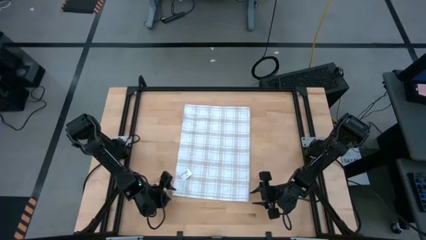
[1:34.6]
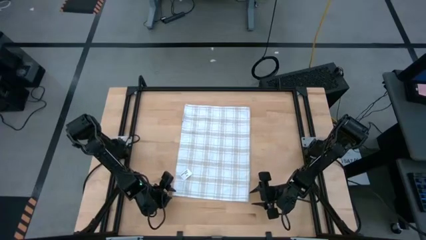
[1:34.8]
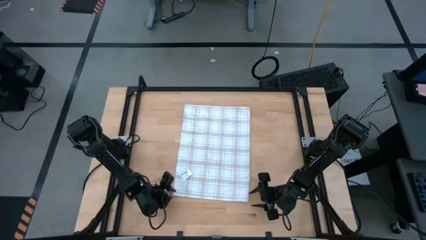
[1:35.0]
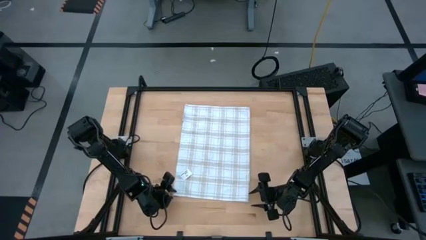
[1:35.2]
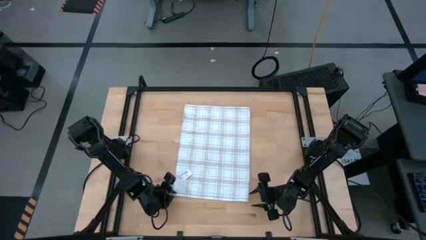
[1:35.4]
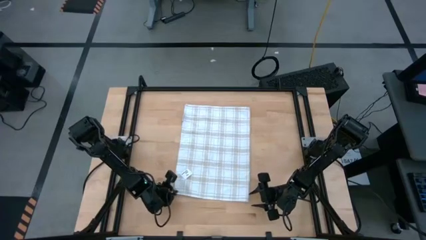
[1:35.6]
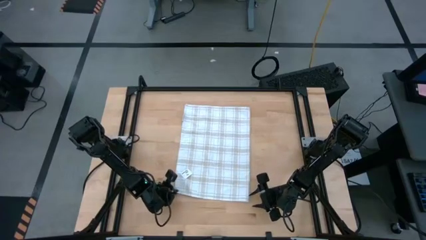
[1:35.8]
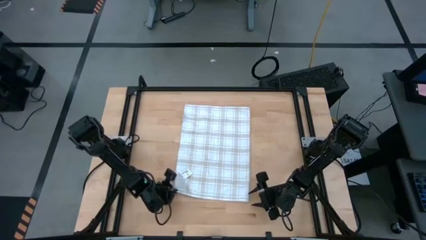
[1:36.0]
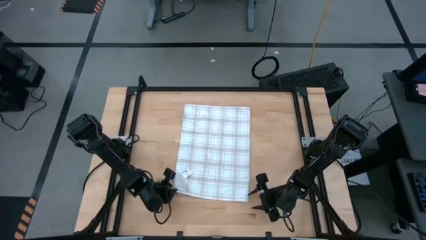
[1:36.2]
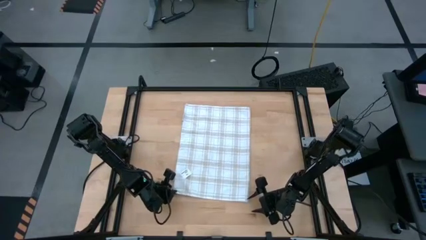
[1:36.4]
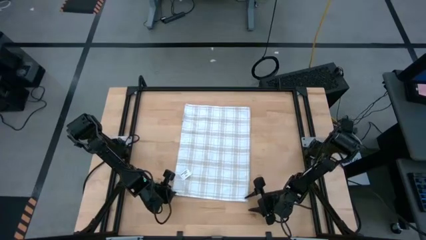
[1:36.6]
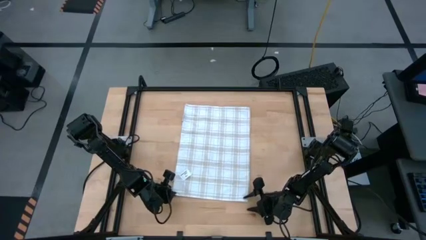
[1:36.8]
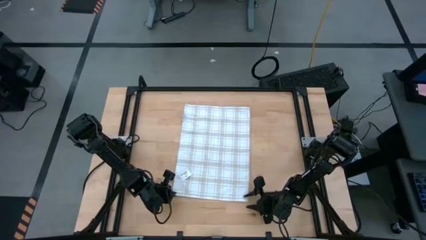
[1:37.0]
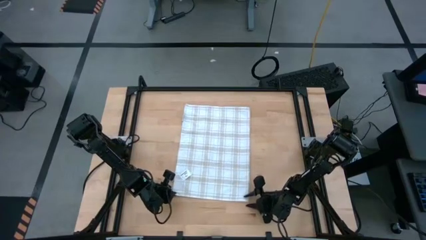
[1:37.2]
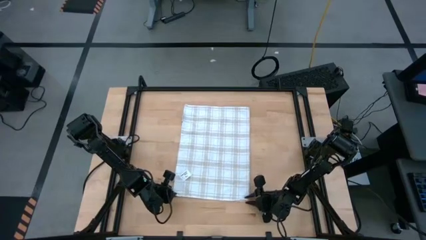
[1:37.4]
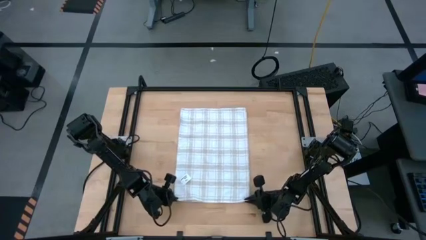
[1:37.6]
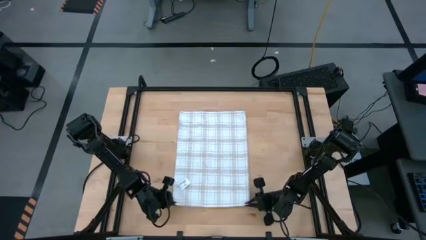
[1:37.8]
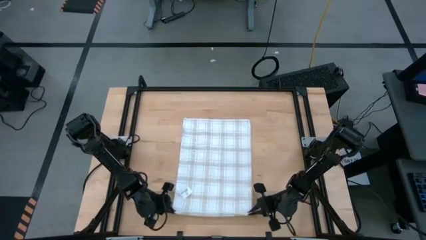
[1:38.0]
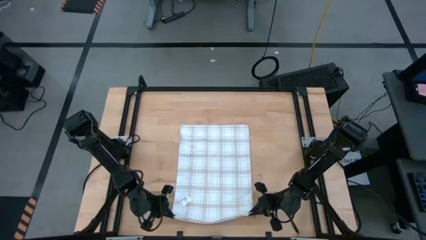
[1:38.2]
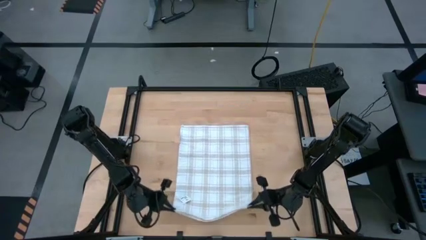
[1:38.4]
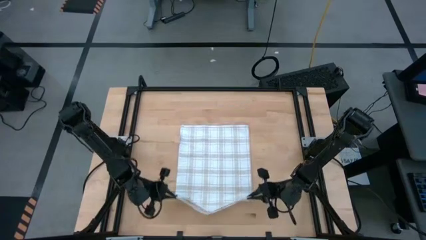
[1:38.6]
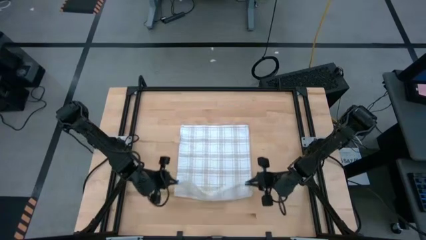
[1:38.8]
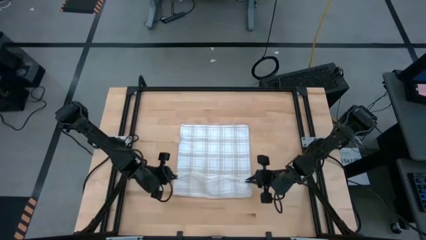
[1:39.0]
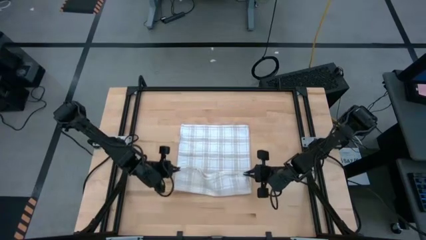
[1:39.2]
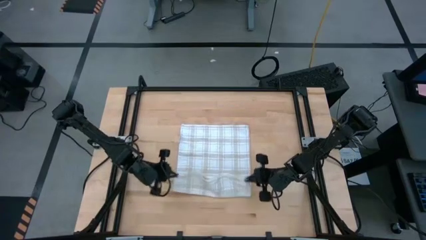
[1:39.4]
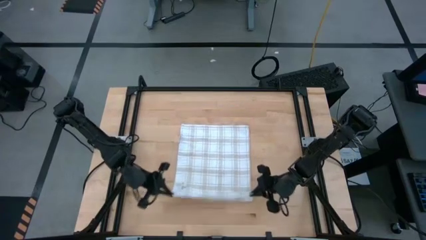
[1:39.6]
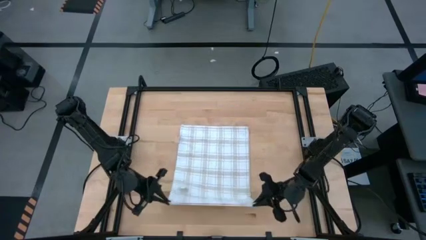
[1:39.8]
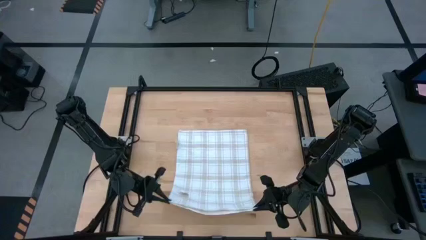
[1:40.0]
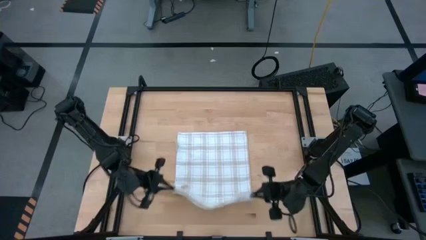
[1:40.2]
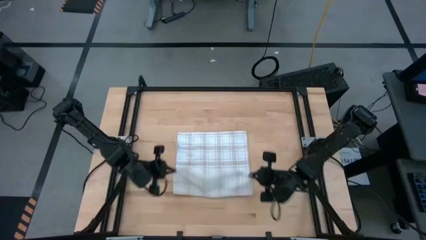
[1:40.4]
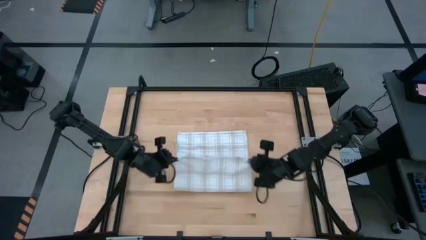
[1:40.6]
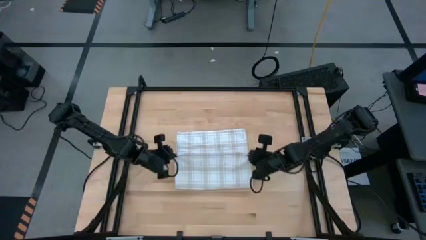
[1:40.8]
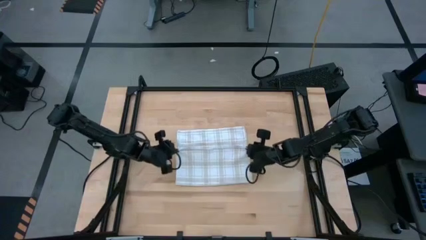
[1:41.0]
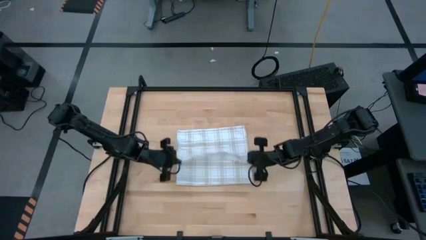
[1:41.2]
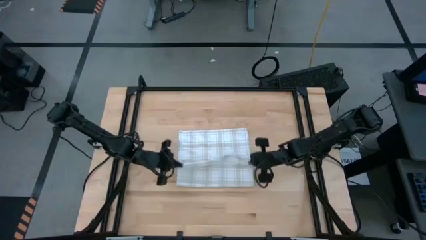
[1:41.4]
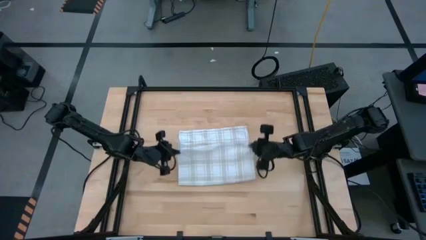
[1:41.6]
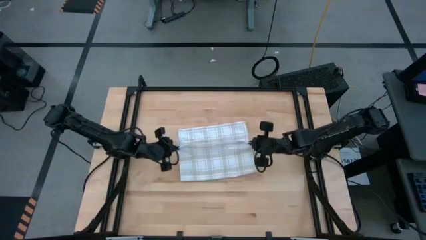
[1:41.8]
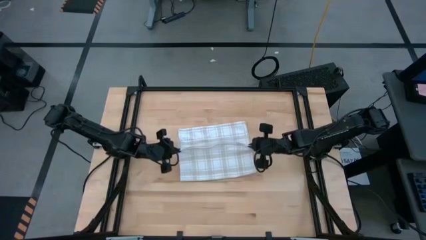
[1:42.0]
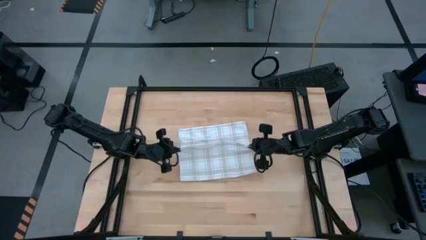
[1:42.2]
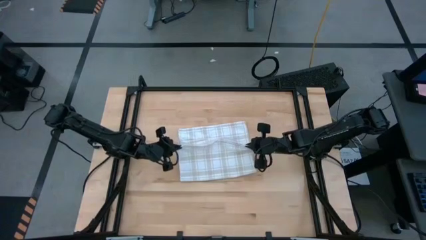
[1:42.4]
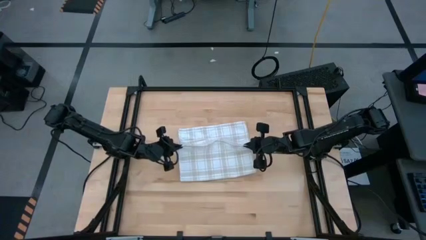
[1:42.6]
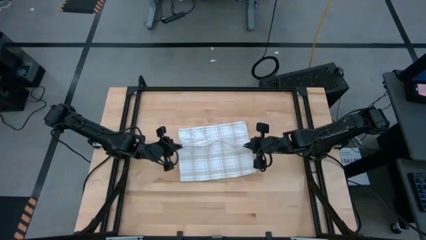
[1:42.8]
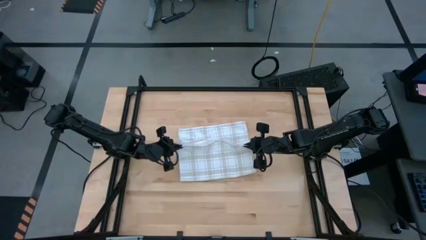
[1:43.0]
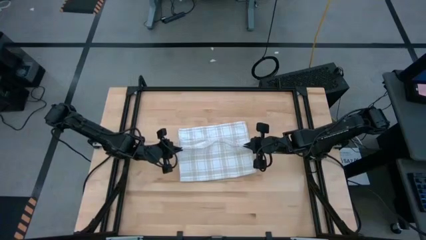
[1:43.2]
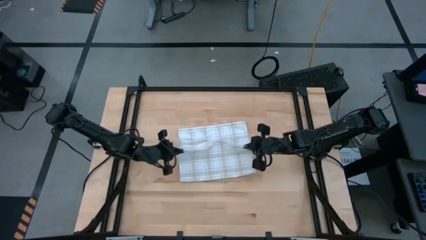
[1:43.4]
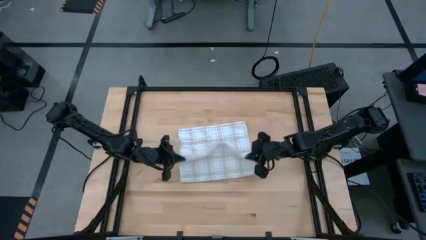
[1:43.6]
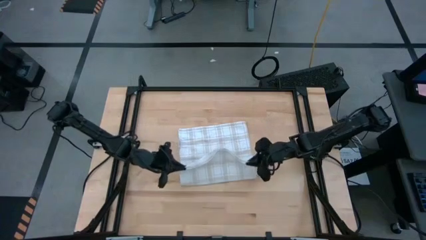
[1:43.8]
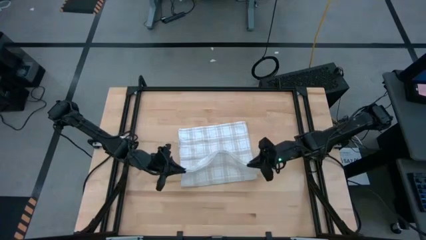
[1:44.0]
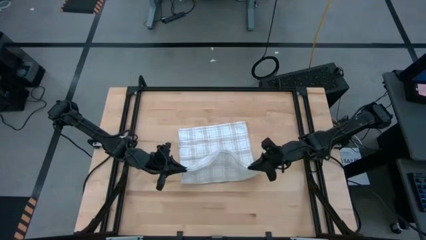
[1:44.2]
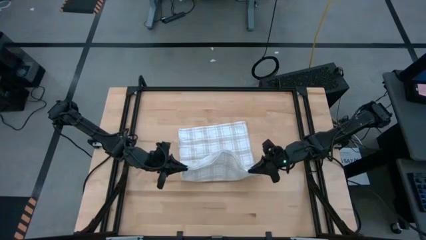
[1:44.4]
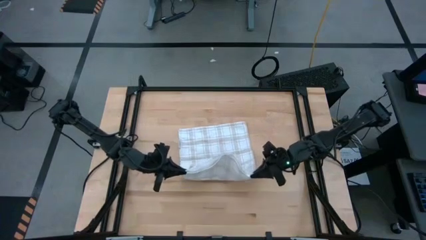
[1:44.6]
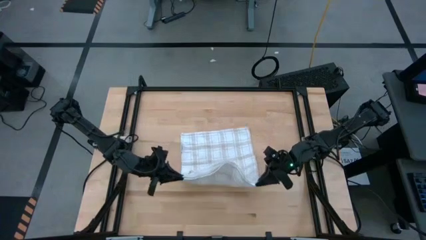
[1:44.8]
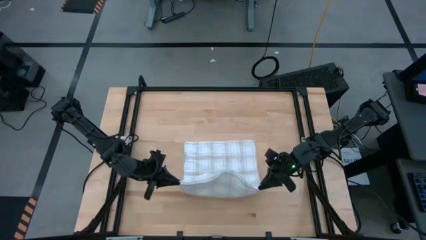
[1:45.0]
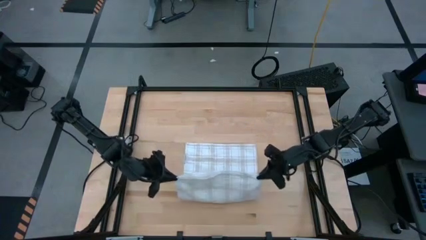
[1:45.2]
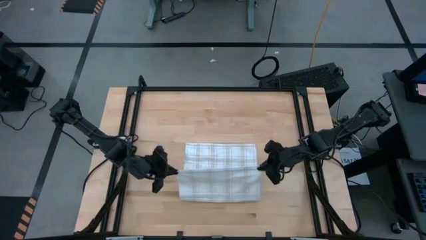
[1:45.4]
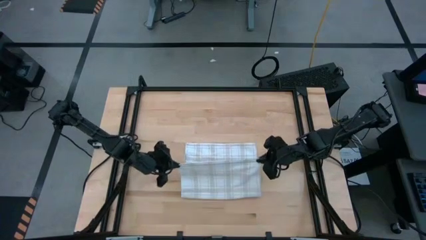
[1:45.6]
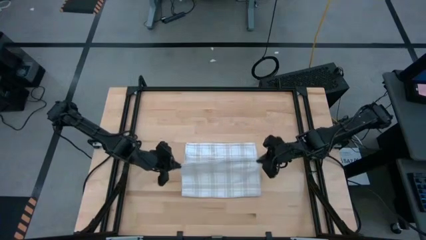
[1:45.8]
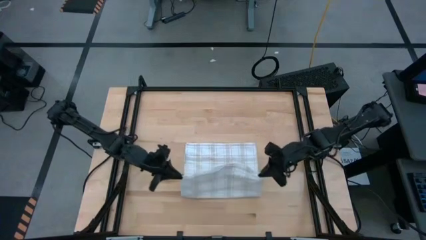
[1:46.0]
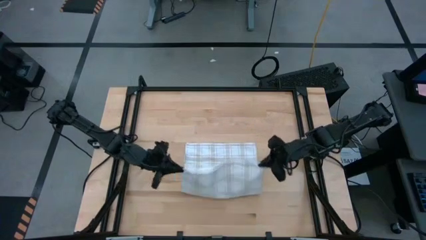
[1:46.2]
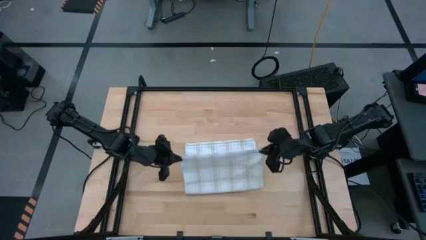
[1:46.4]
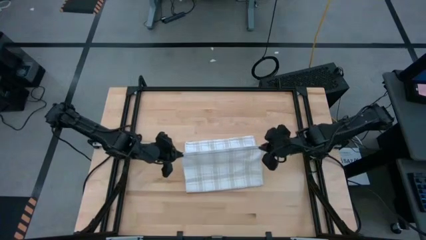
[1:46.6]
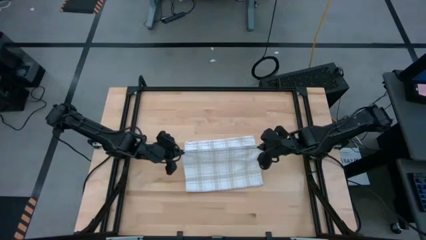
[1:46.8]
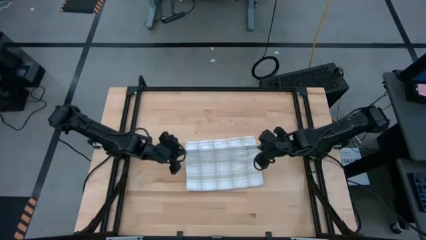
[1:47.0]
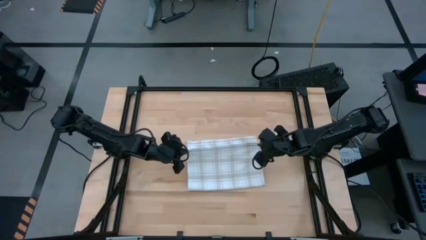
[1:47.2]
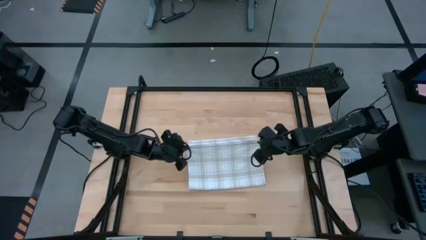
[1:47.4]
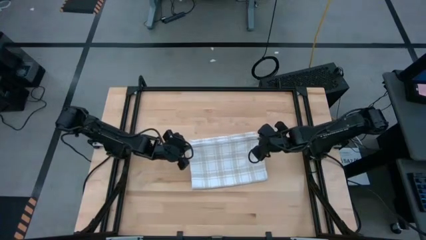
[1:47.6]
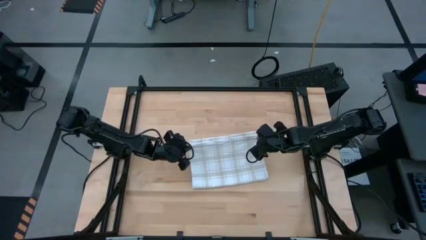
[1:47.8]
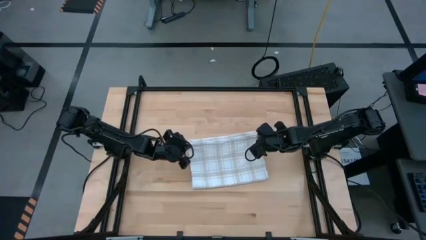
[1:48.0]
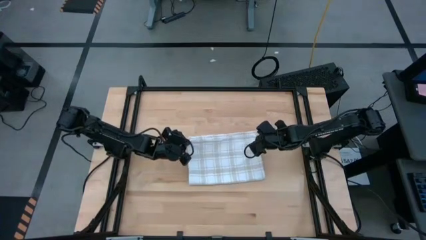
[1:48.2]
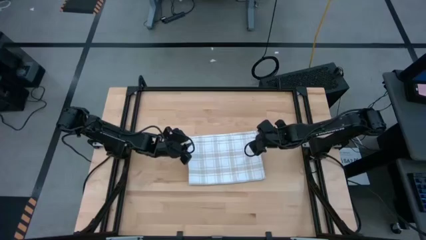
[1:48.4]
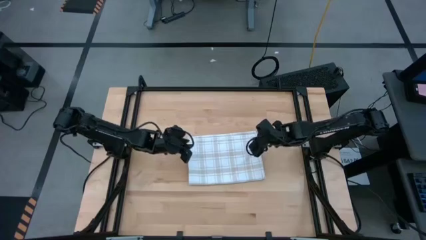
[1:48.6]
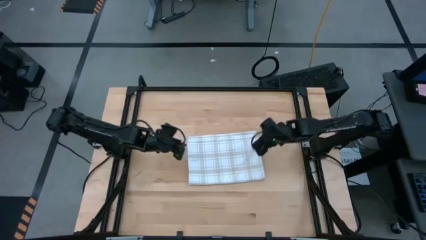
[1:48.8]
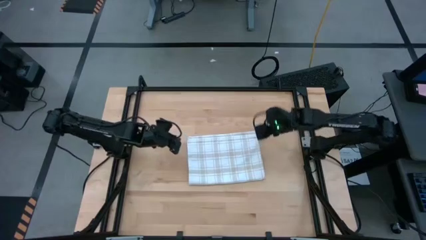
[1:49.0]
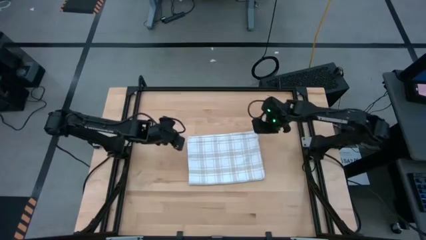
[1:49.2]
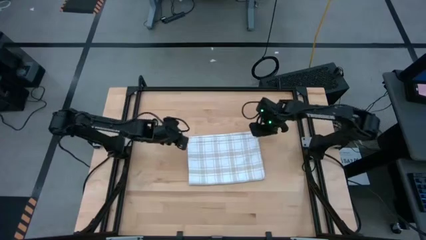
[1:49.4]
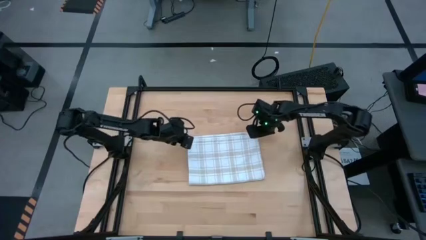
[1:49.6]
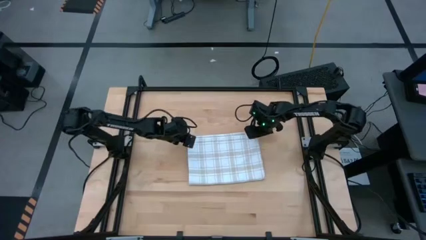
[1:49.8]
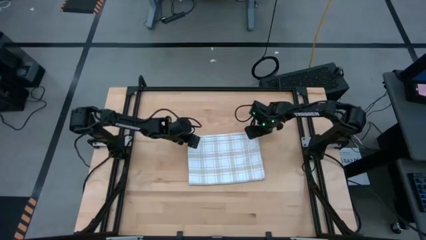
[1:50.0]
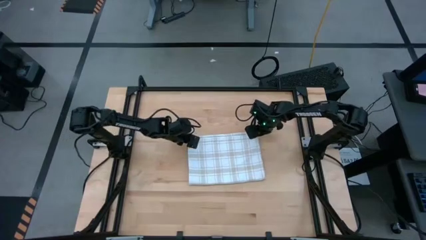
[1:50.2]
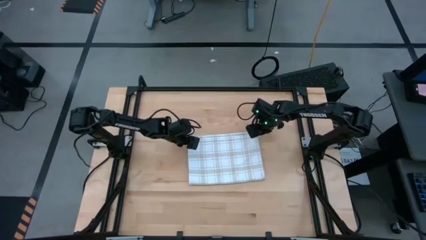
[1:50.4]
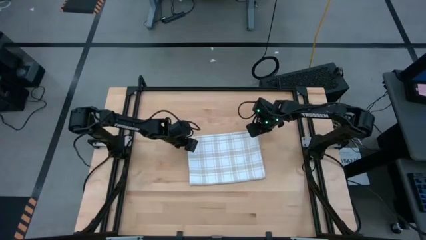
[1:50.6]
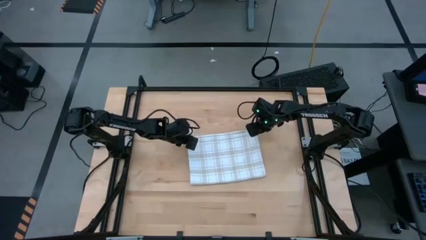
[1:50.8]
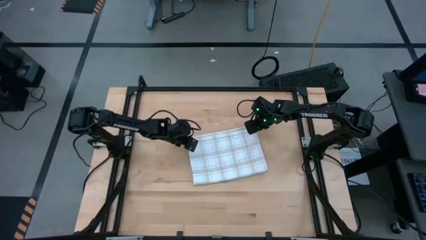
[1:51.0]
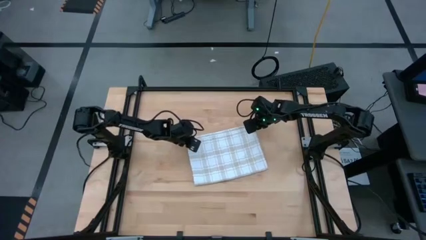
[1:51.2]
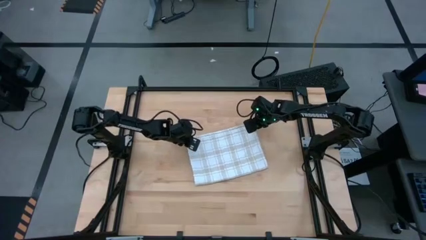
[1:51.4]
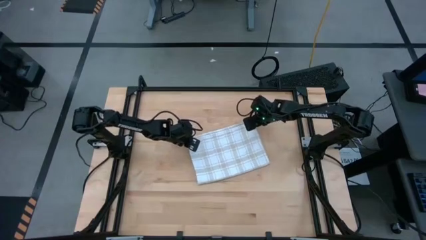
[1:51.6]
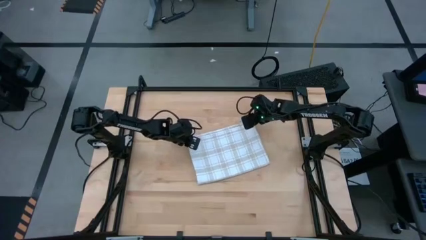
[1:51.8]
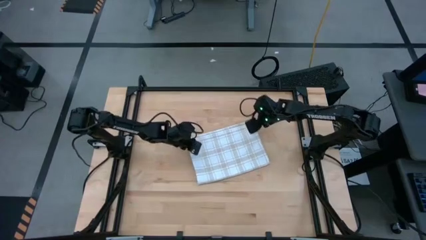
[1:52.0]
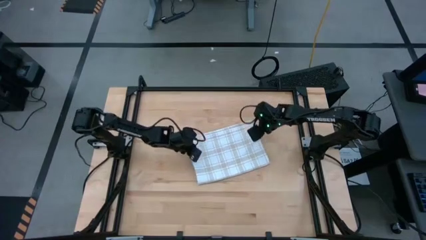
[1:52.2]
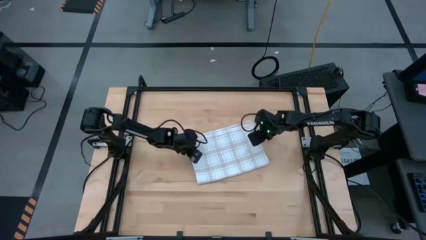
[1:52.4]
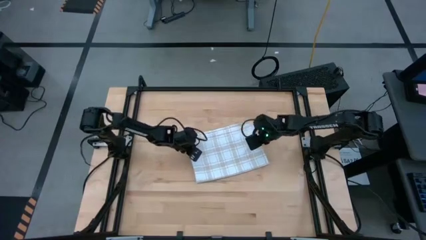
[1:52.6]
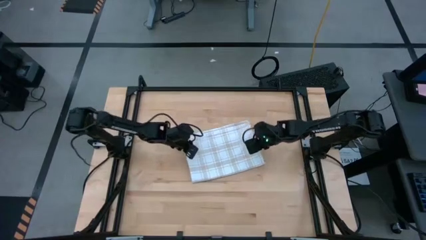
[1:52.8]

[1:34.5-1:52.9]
Task: Roll towel
Roll the white towel
